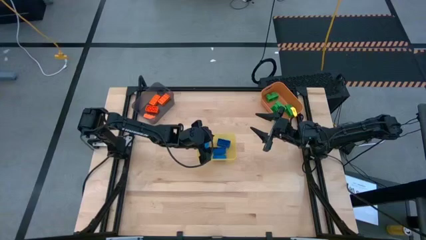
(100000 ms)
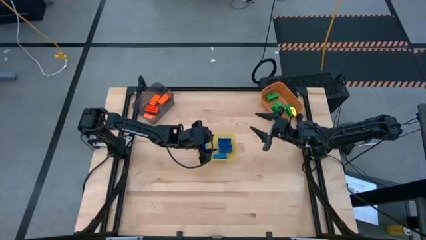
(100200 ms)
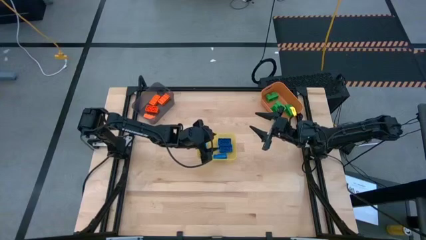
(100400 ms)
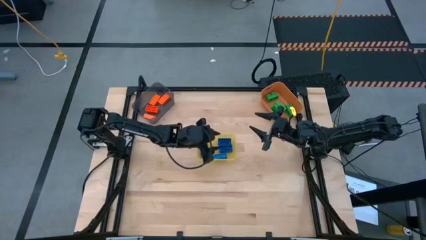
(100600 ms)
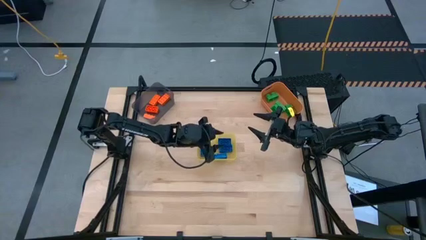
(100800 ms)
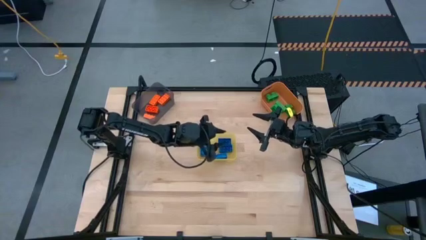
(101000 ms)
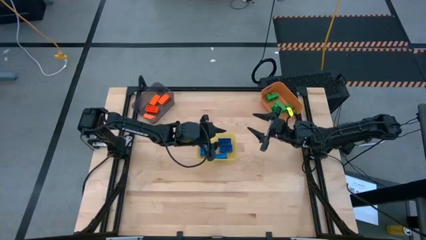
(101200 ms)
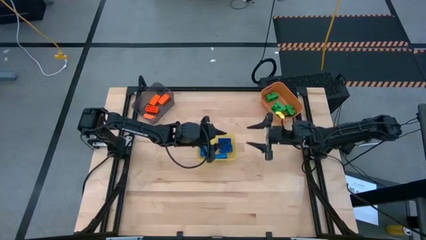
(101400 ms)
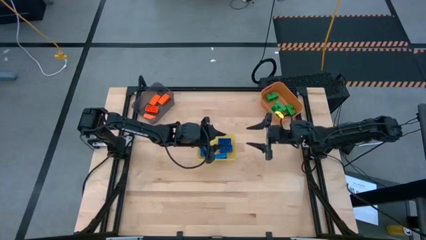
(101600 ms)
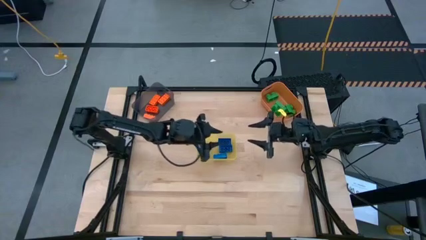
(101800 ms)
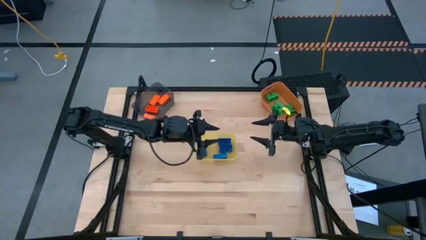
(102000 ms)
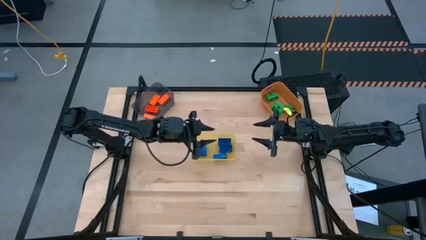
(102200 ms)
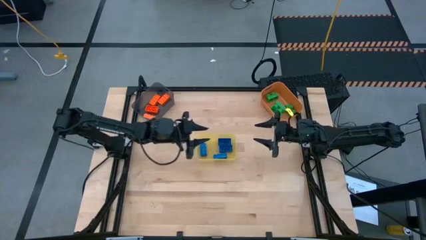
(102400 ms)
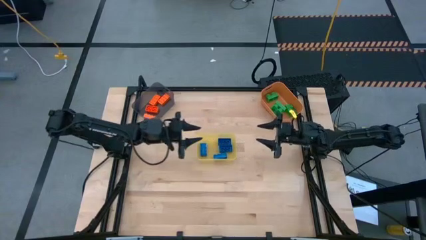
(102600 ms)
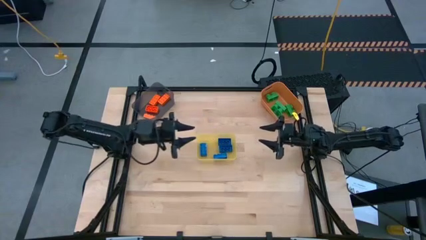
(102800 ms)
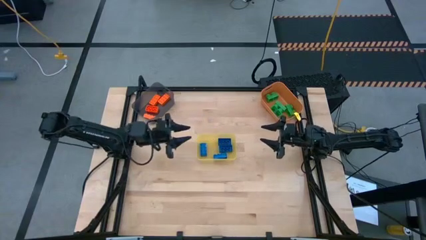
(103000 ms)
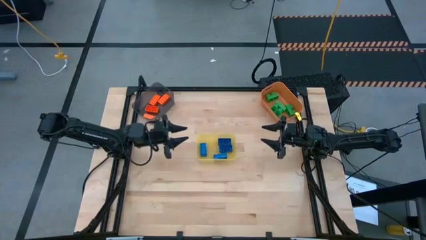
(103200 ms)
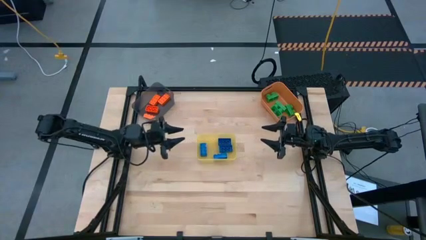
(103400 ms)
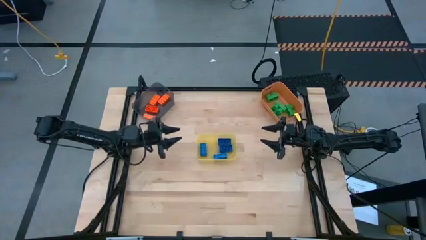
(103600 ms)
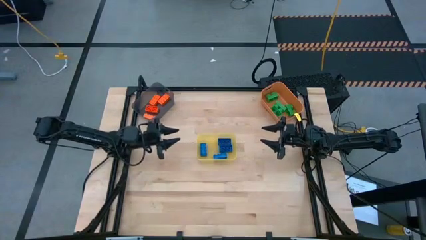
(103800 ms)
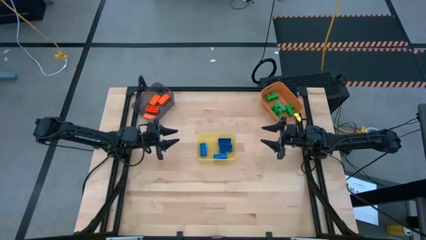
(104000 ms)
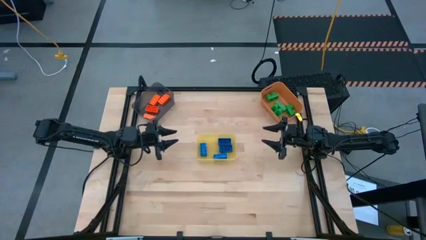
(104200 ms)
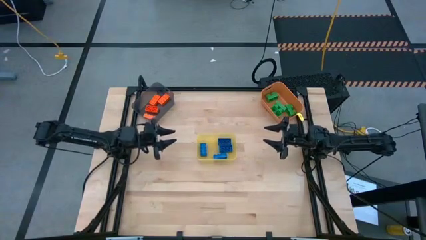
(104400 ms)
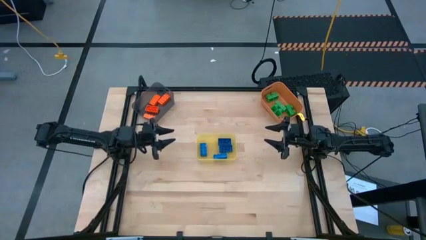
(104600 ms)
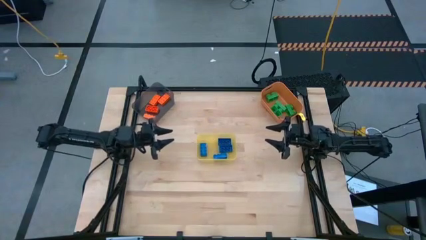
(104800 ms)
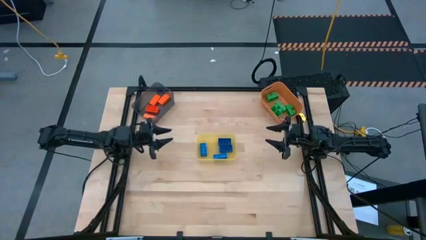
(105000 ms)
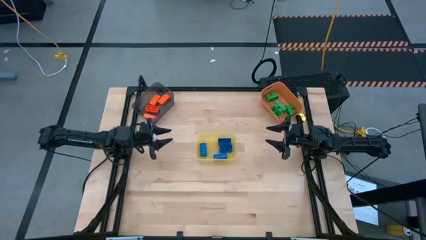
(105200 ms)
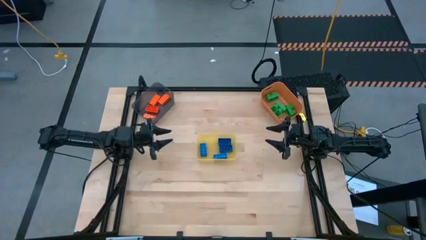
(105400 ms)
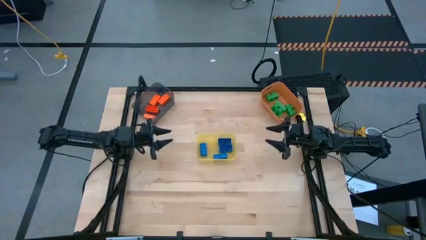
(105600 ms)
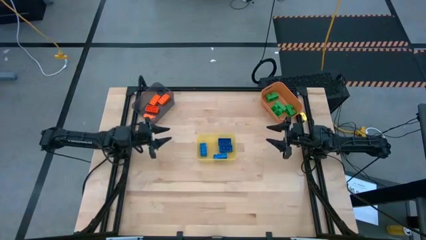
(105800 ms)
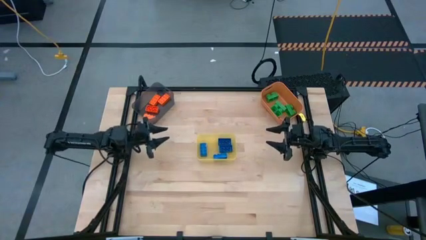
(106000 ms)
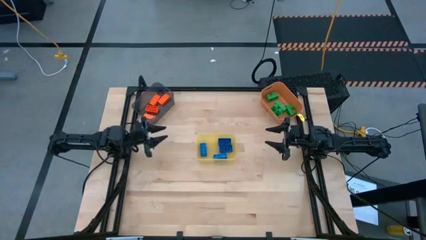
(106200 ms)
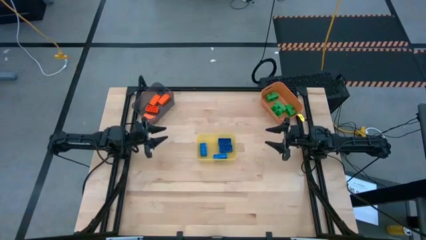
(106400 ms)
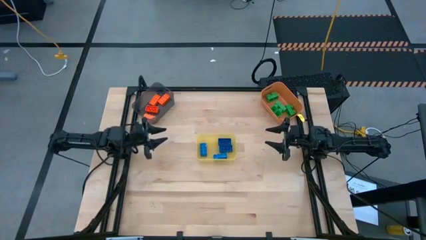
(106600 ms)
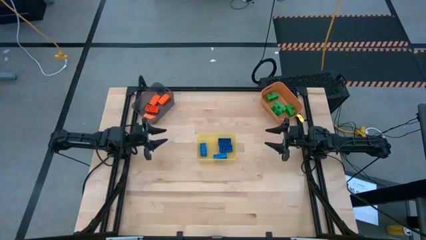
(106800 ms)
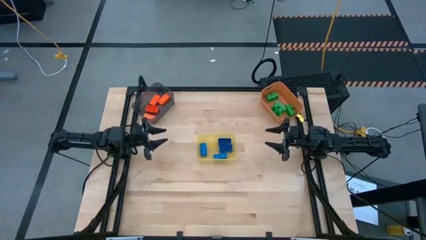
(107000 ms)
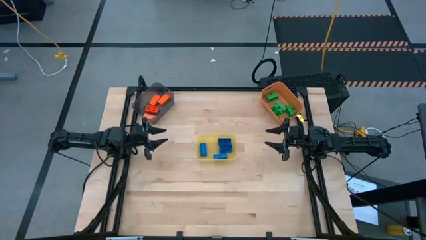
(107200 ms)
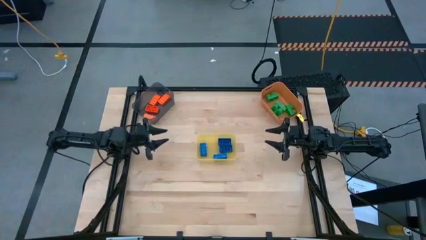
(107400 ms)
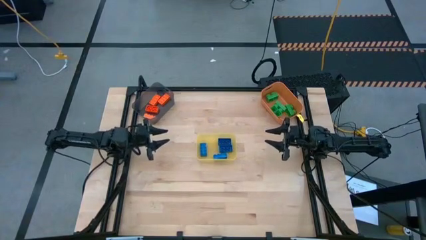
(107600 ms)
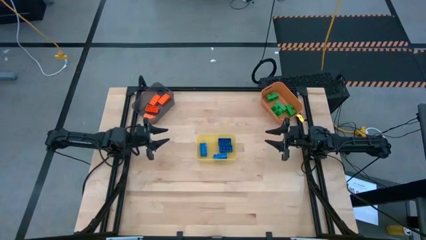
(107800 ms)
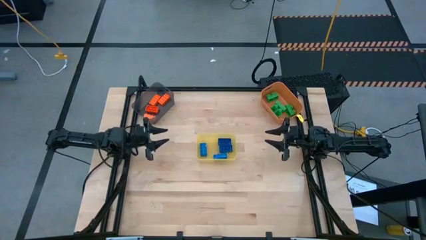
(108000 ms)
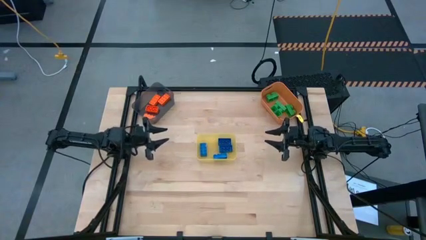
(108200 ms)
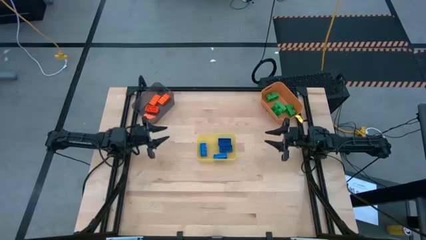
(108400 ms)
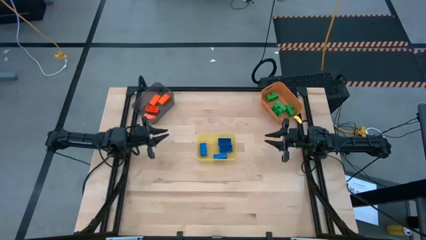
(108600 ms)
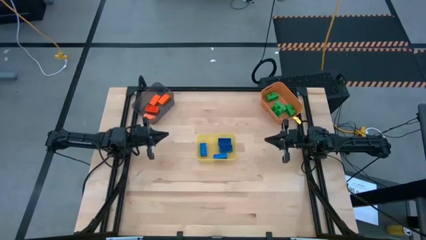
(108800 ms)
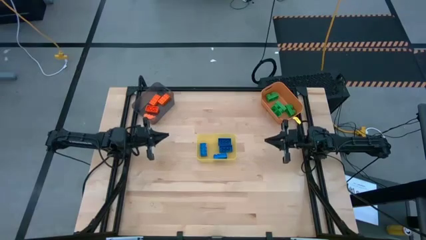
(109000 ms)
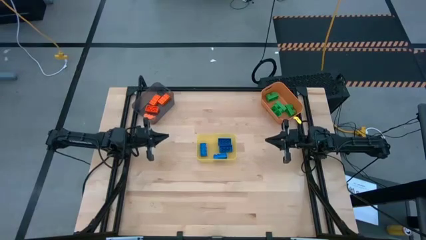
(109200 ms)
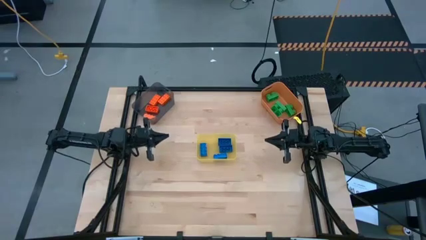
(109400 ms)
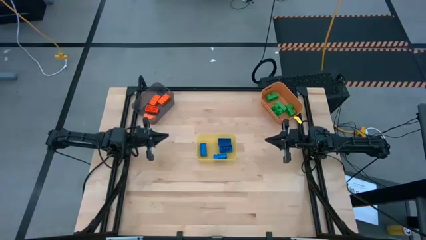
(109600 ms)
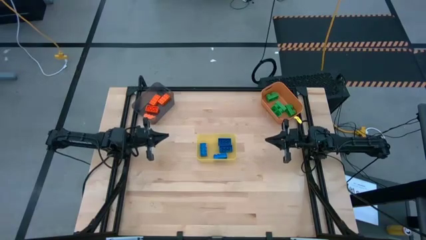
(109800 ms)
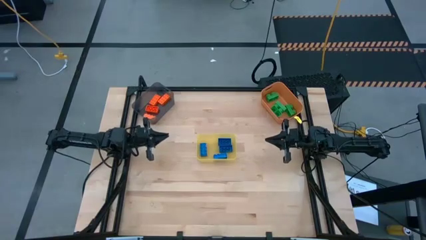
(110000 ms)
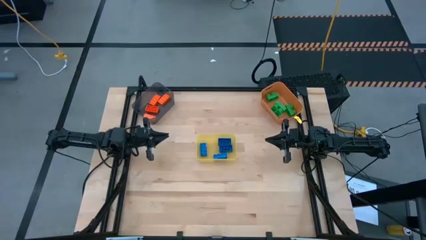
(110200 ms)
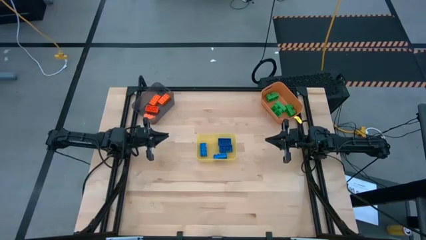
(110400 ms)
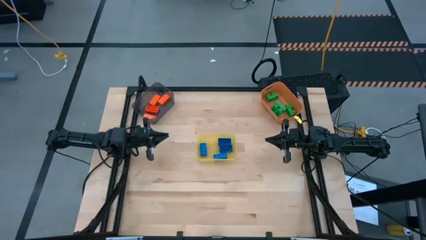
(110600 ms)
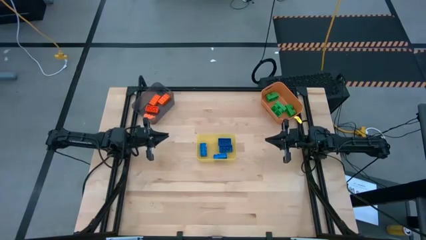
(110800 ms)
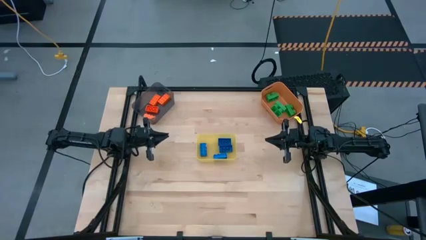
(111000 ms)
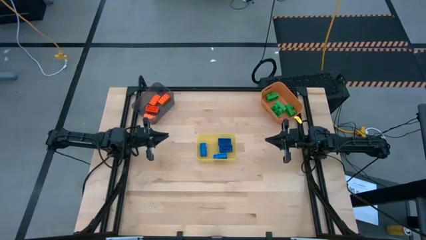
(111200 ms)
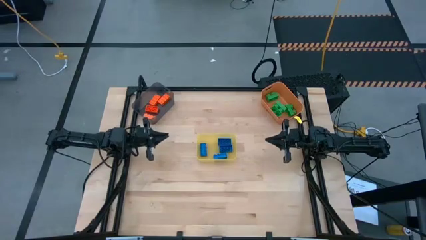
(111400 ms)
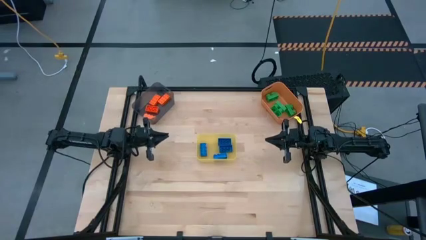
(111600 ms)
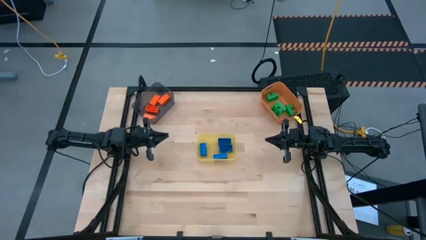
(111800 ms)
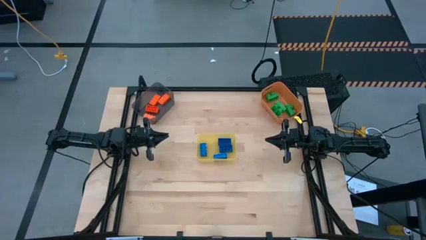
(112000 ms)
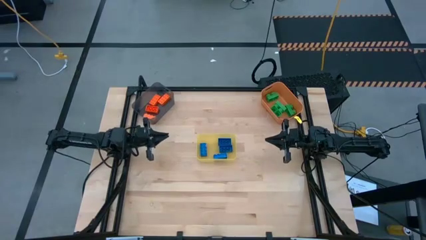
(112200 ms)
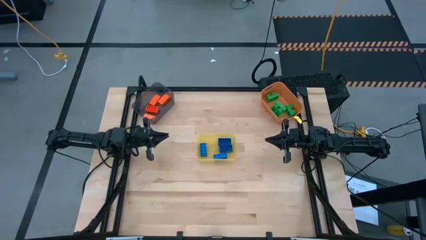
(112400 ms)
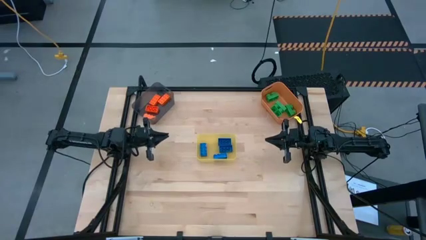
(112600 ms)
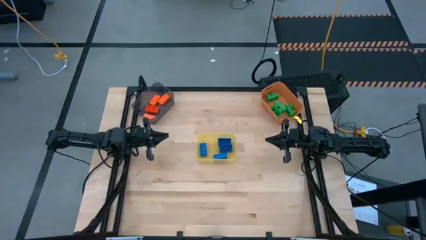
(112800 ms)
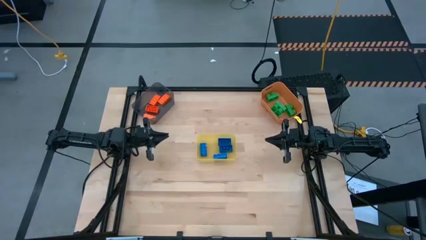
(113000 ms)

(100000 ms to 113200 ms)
Task: Sort & place blocks by color
Return to Home Position

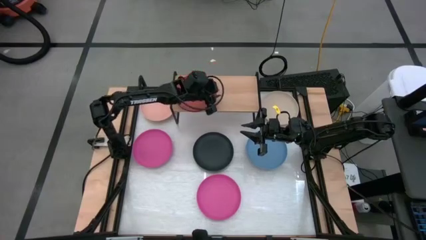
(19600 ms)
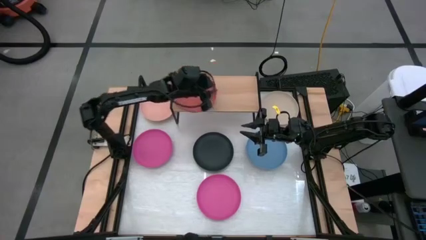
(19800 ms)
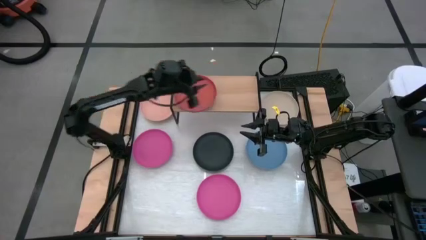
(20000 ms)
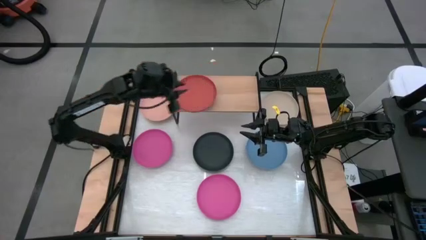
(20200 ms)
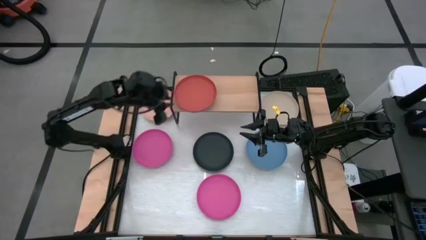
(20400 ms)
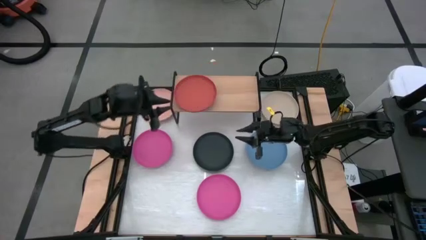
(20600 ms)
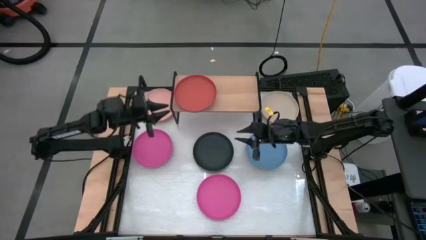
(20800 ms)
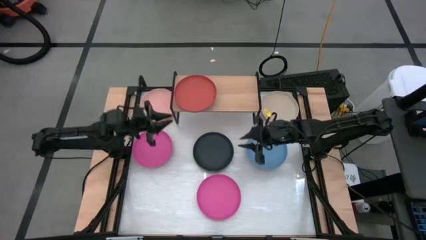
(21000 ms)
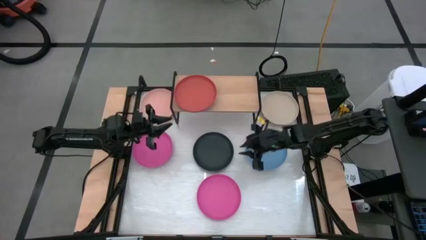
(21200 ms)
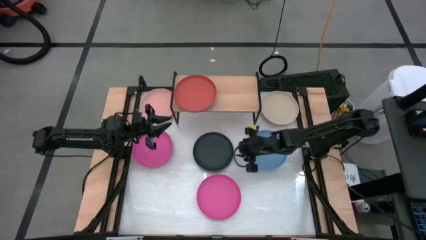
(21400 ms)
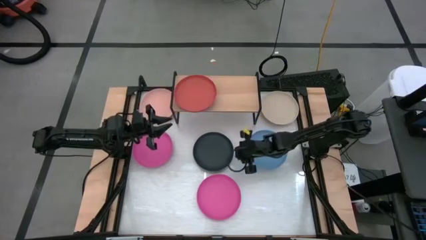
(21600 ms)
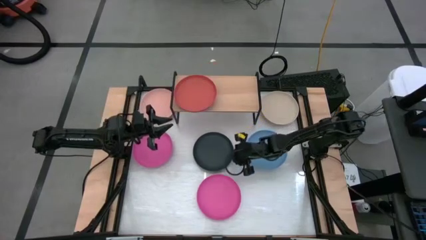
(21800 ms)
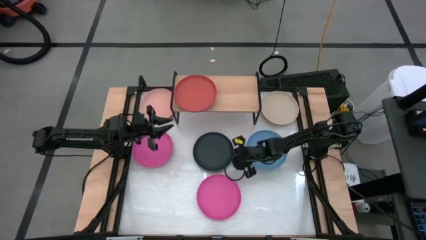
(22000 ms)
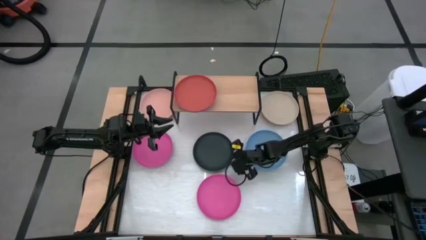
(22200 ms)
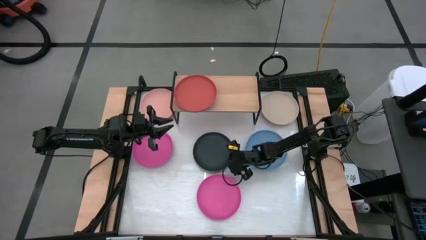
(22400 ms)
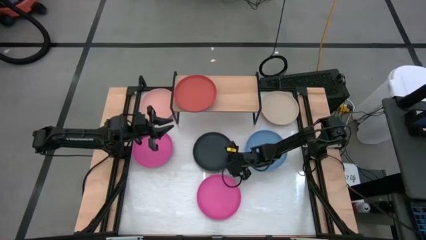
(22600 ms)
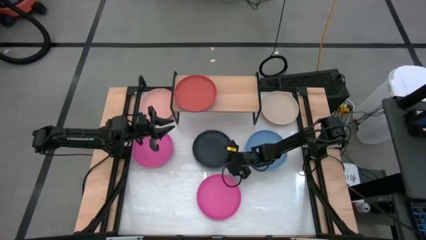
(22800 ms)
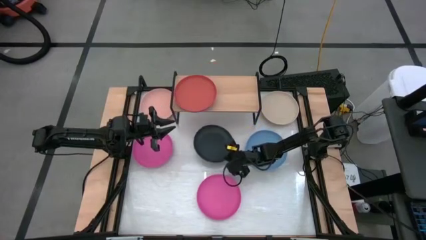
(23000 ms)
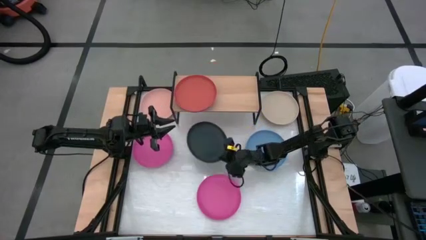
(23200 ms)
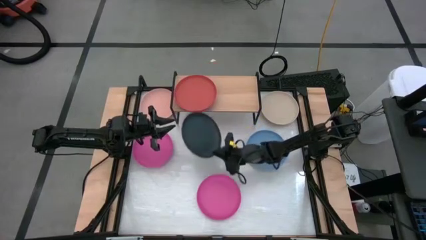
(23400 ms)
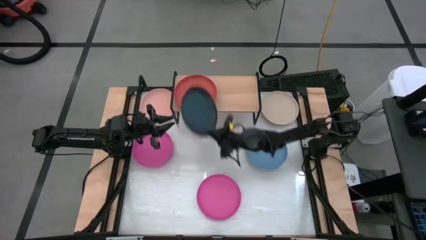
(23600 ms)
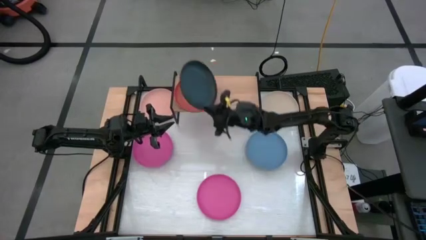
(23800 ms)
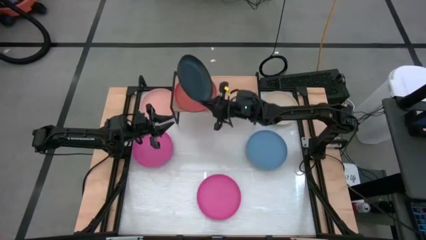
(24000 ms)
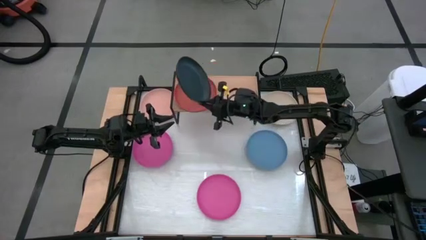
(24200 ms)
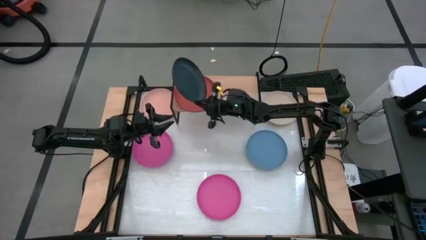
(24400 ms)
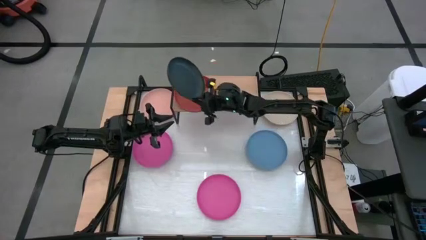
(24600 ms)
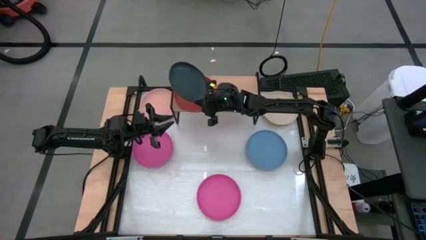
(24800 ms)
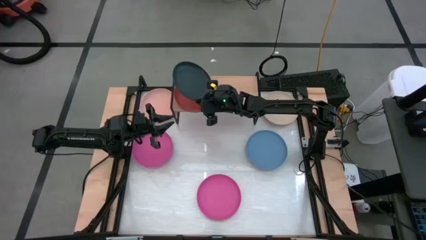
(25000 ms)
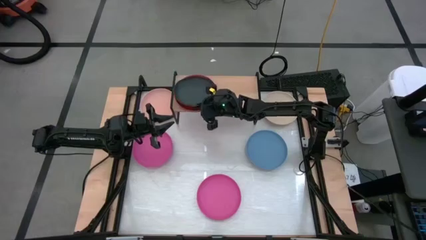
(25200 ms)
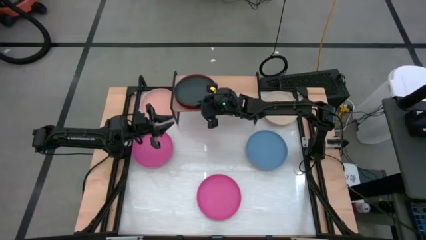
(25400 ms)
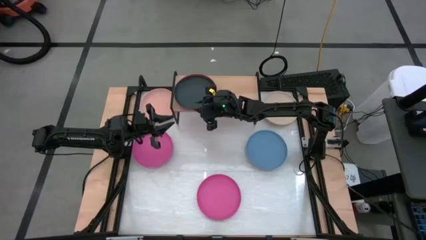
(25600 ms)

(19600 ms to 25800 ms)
Task: Place and stack plates onto a shelf
Stack the black plate on top of the orange plate on the shelf
